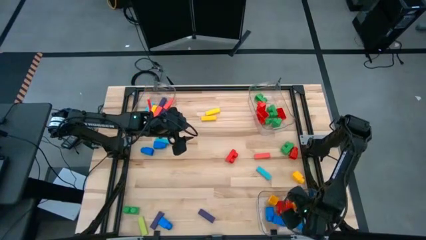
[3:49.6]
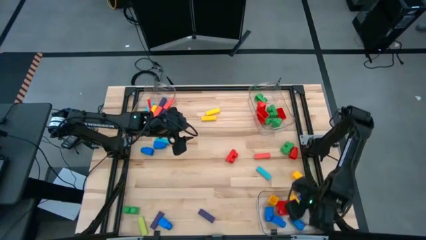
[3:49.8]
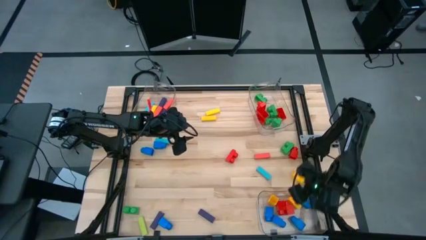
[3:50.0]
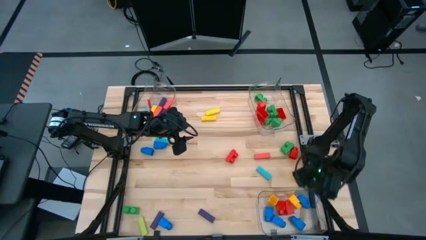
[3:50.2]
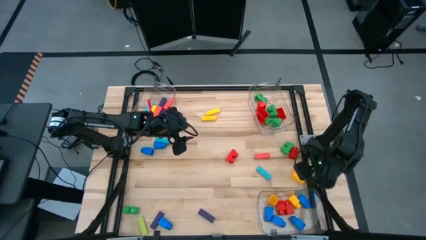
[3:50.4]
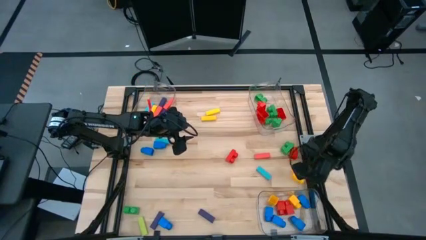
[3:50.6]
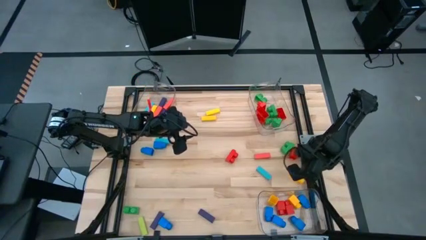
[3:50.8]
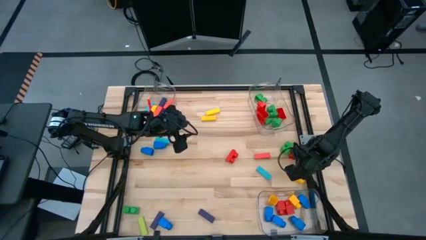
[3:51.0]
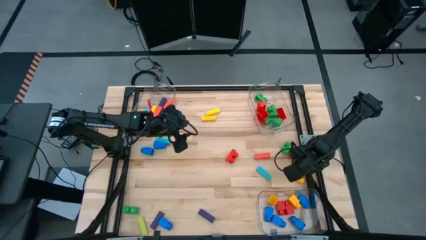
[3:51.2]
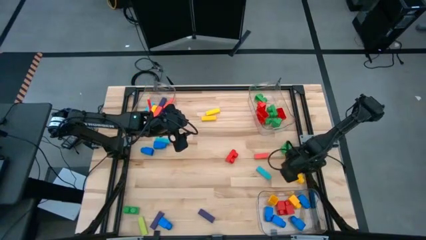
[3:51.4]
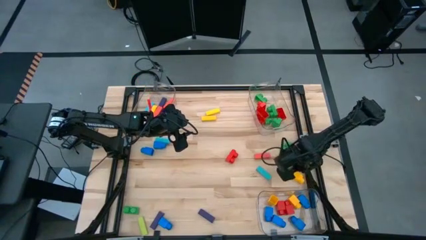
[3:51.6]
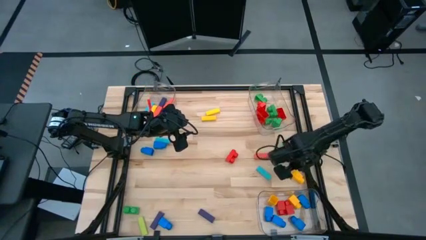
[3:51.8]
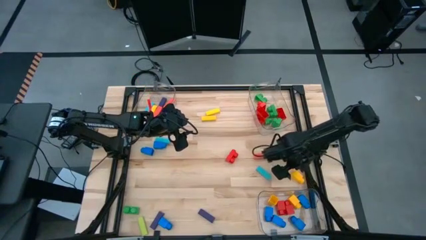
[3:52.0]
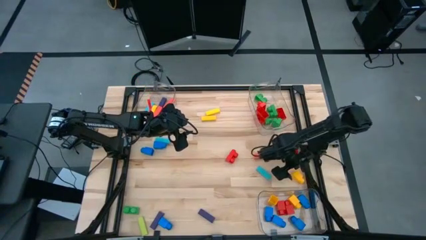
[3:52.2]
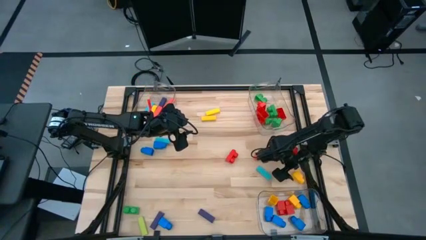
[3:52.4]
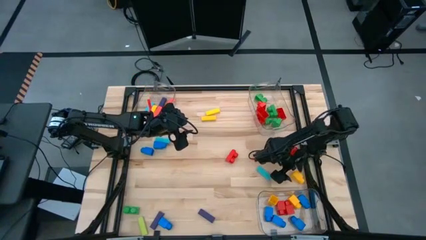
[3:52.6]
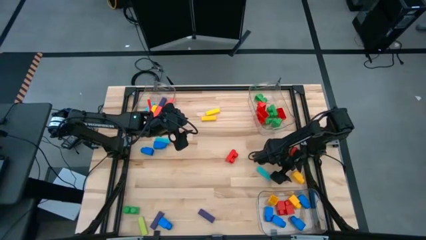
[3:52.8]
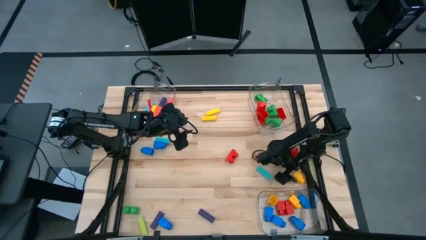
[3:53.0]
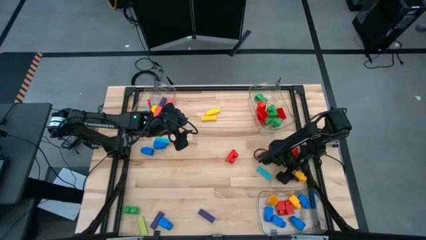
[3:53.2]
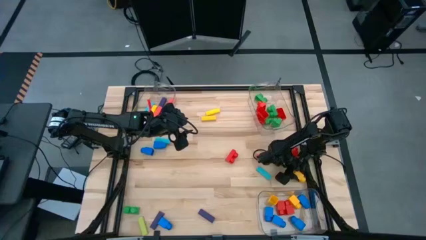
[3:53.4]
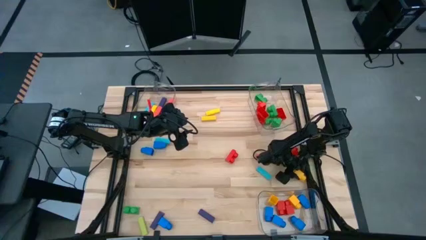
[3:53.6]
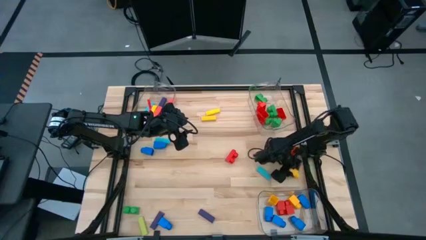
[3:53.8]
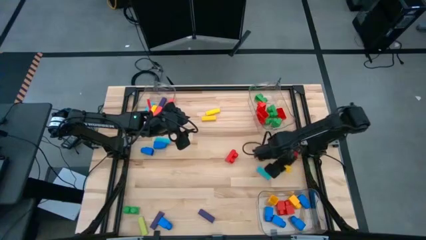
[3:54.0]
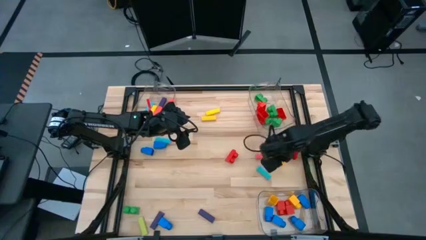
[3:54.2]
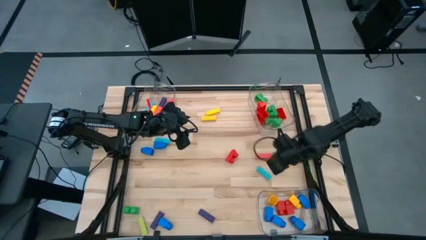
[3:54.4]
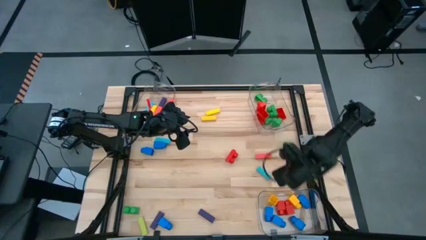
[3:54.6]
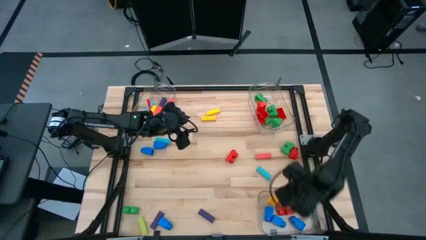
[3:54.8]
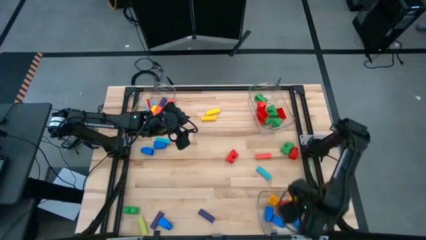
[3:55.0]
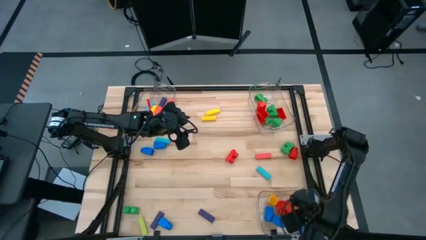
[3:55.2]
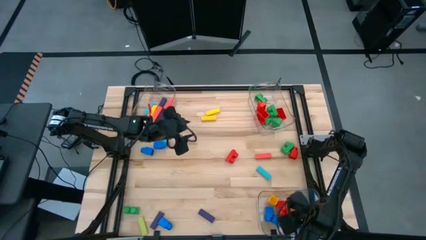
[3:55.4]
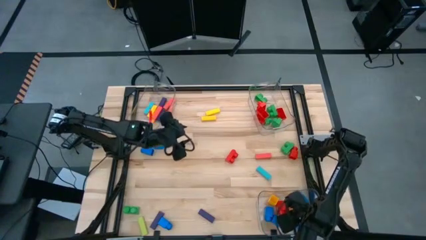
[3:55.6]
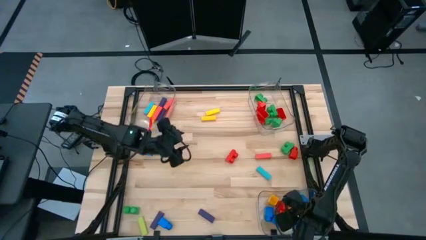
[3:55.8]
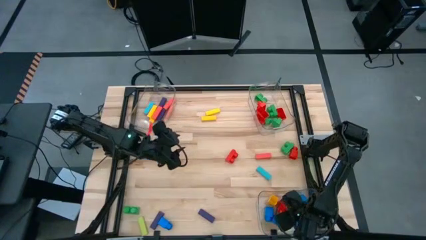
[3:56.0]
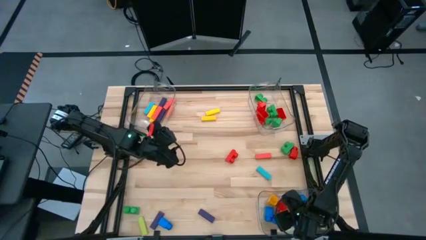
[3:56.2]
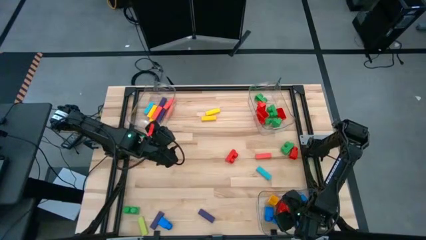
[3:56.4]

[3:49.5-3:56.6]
Task: Sort blocks by size
Put the yellow 1 stud game piece into the bottom transparent bin

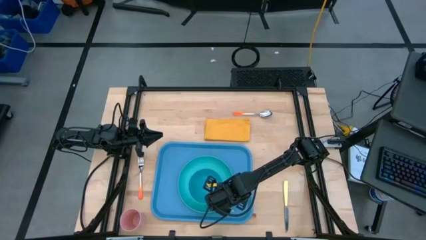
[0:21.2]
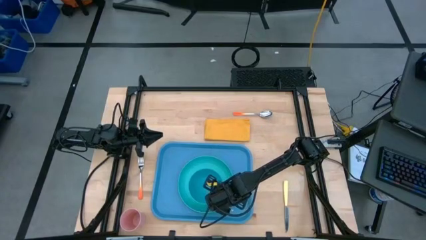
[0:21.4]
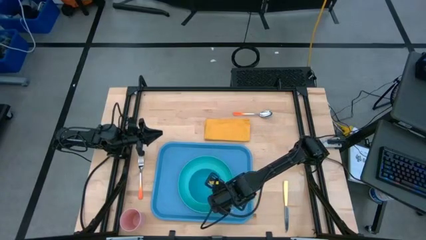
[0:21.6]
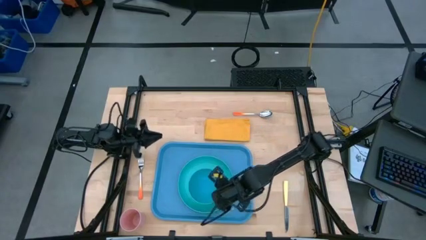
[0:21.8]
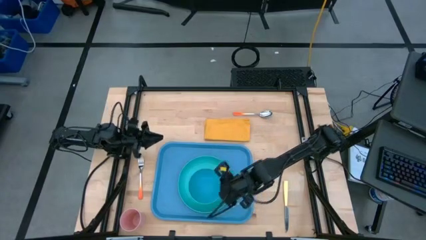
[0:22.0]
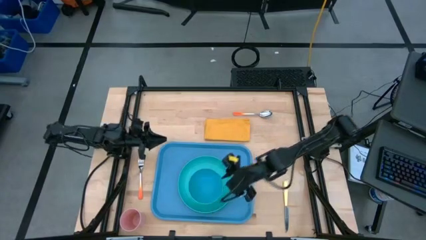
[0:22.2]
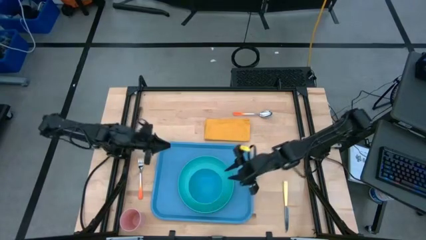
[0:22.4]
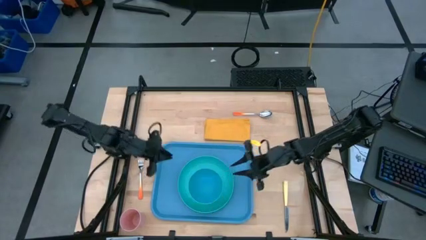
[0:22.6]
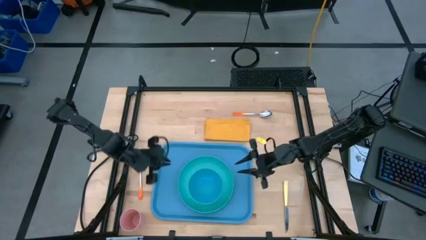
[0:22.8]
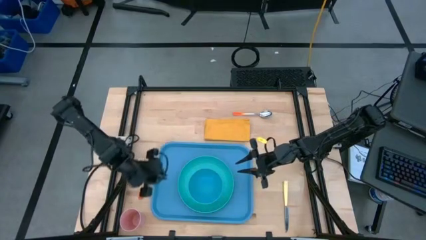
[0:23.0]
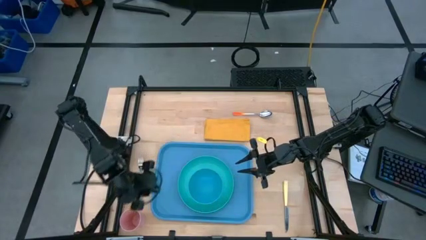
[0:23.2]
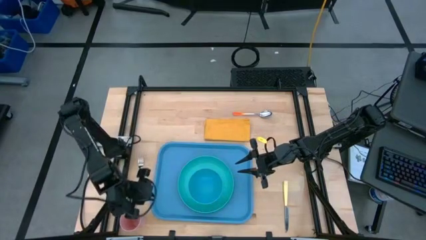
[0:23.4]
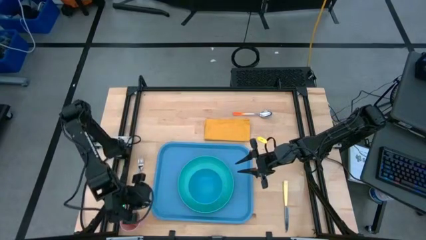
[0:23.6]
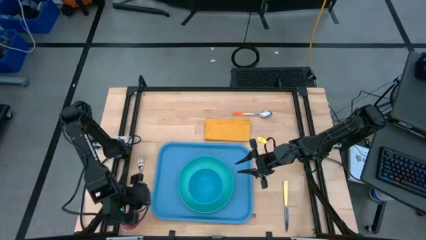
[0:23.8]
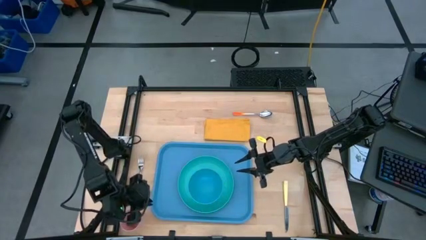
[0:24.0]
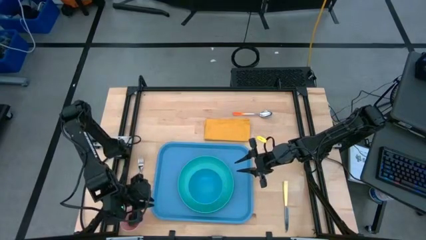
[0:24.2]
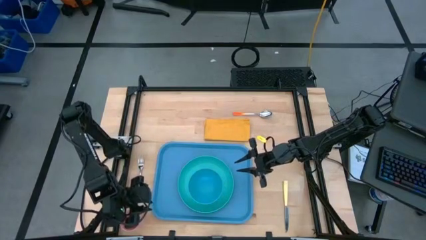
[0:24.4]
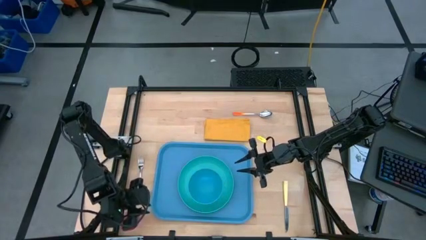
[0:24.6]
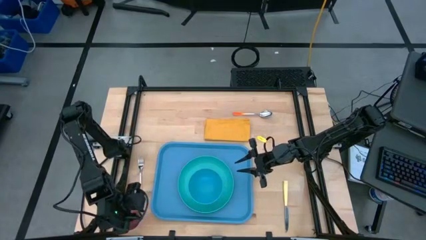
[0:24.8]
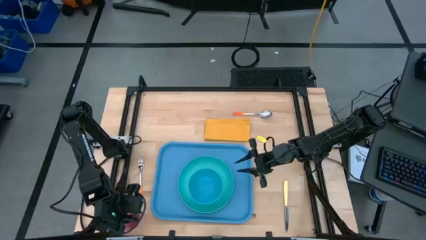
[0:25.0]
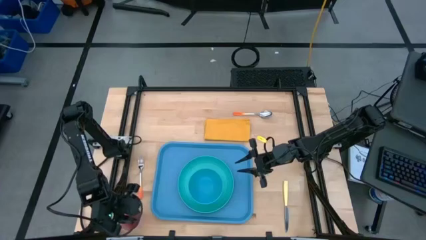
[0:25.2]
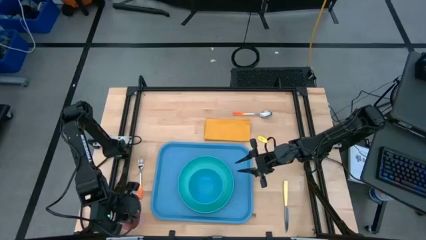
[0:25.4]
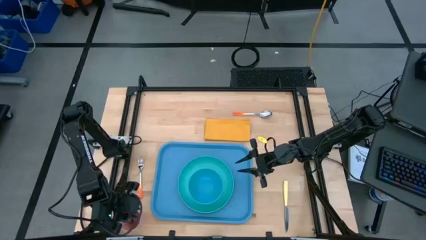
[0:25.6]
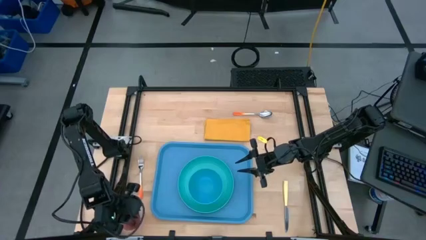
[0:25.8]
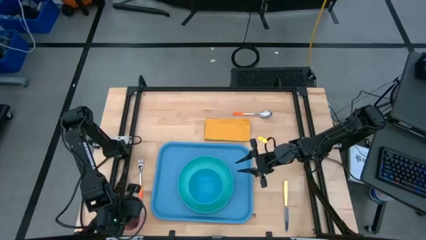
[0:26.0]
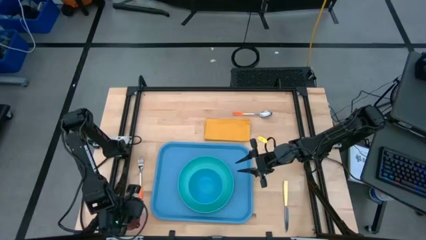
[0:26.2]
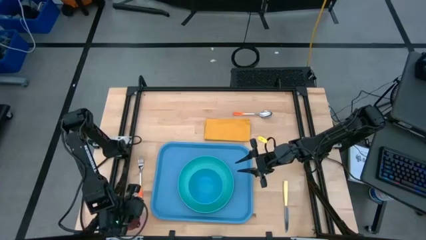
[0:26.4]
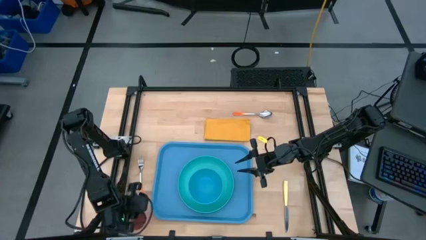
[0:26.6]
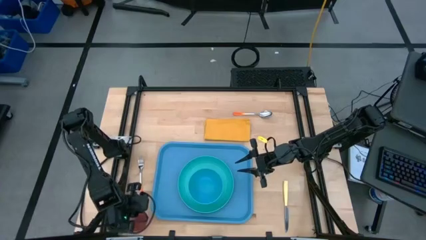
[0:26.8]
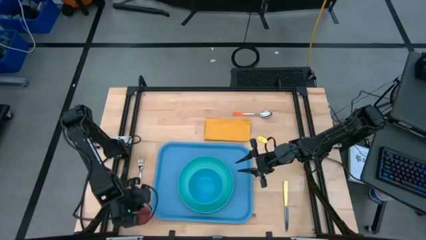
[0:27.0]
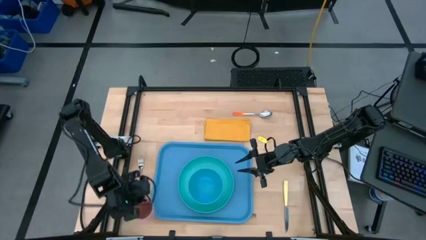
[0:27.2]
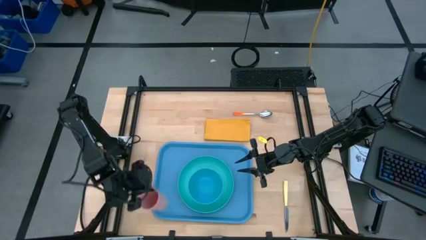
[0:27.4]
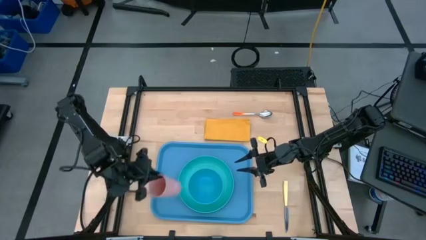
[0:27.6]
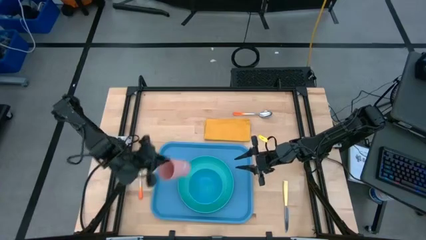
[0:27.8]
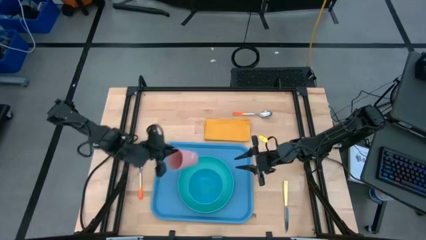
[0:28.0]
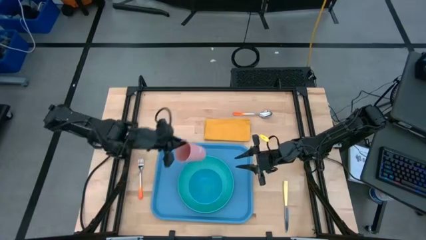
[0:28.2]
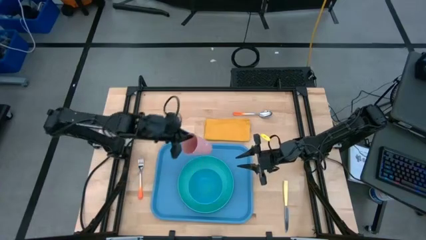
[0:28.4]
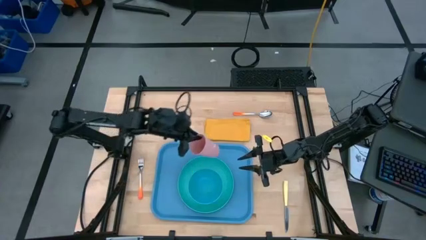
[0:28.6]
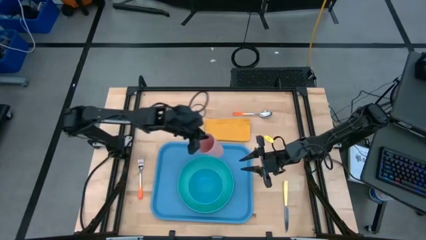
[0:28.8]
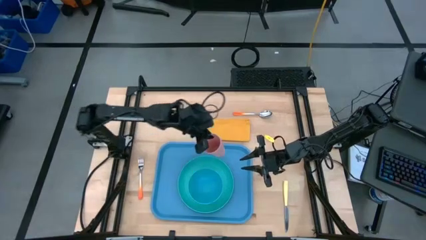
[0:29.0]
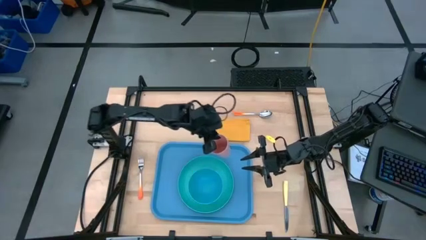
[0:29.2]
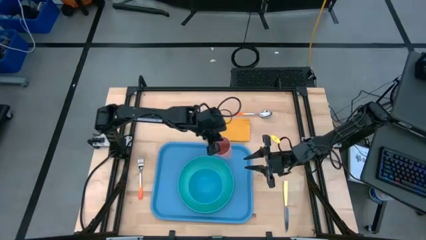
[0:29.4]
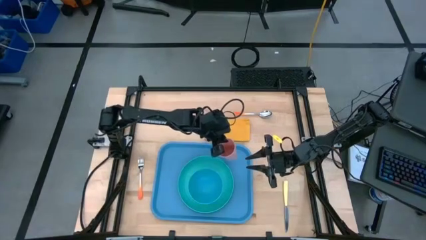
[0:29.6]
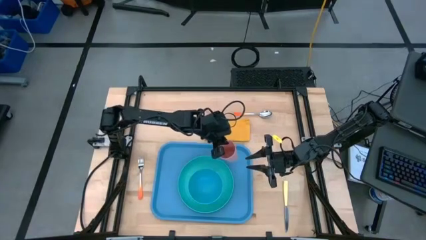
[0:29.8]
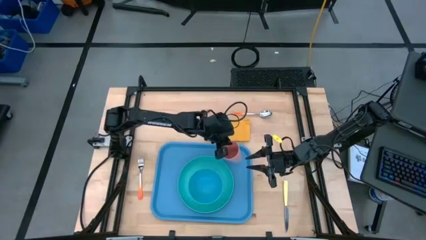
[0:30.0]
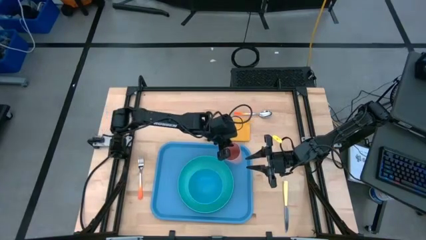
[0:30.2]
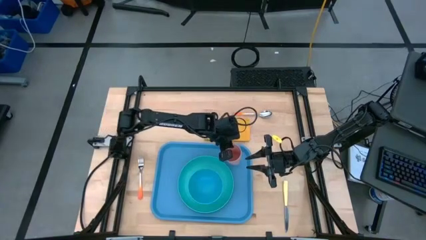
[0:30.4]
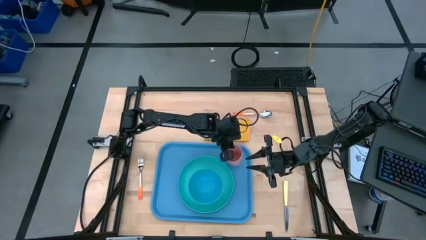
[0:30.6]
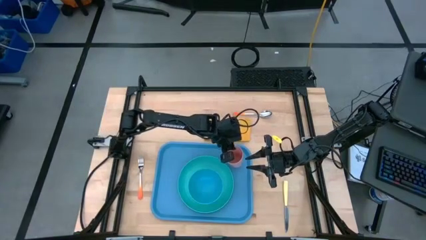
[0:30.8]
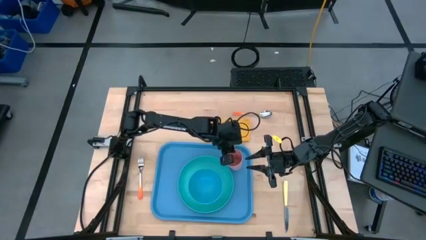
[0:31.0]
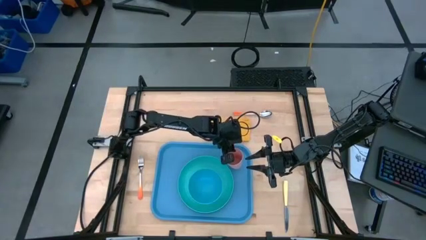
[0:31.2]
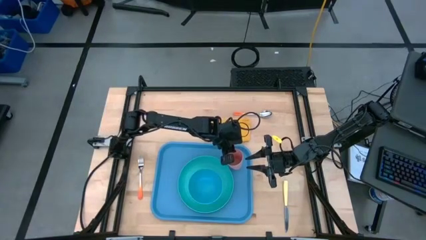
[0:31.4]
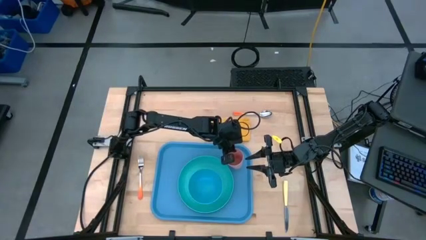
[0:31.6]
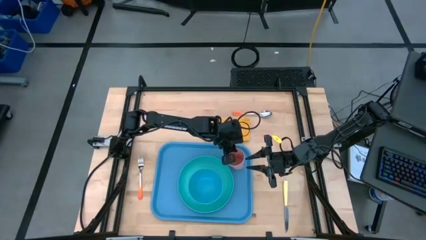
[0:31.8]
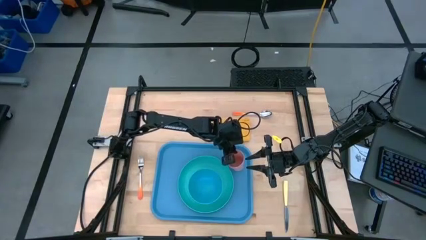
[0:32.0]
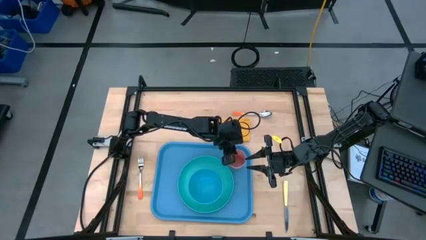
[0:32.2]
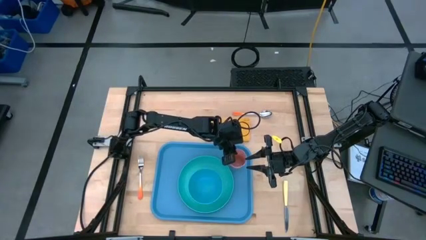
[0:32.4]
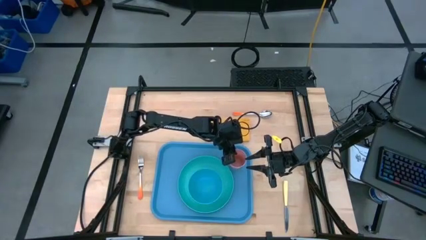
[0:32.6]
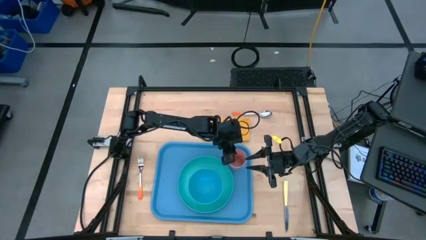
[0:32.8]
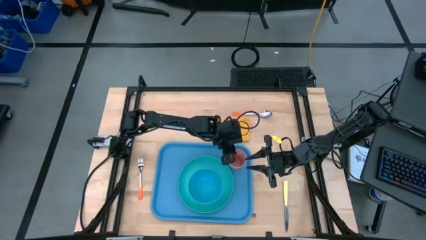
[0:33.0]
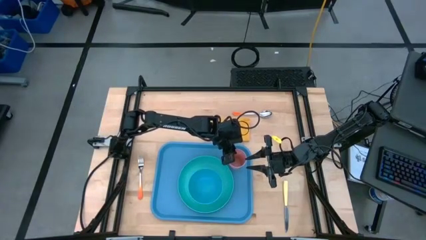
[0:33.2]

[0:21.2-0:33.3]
Task: Set up tray
Put the pink cup on the blue table to the top right of the blue plate
